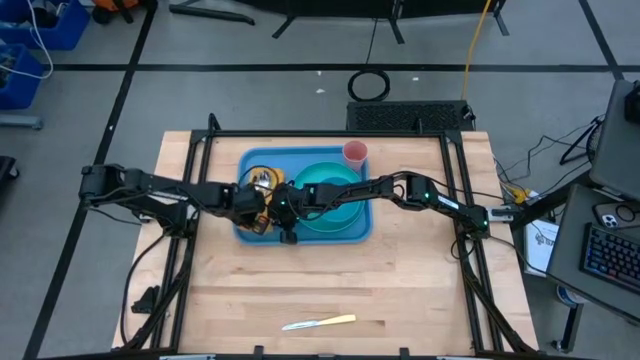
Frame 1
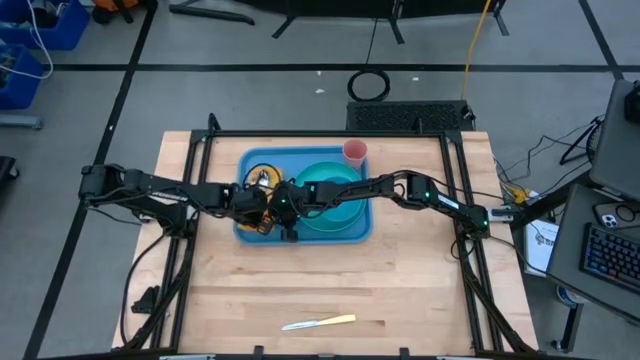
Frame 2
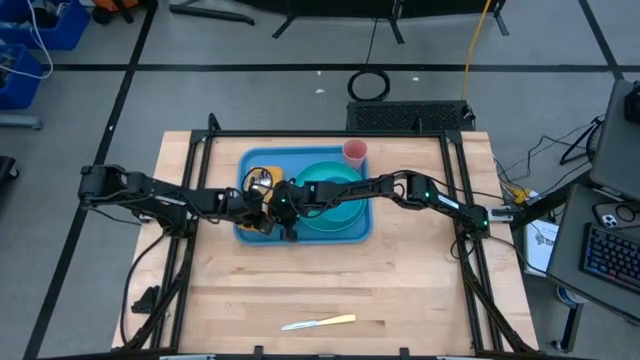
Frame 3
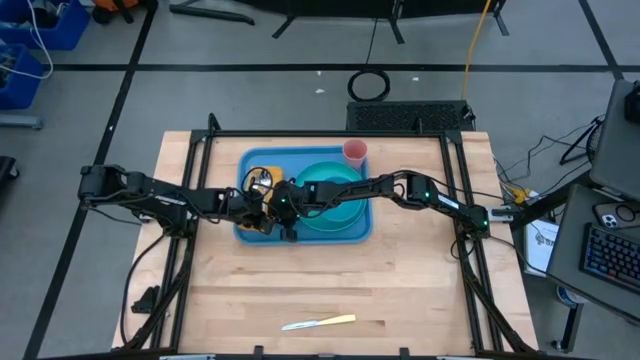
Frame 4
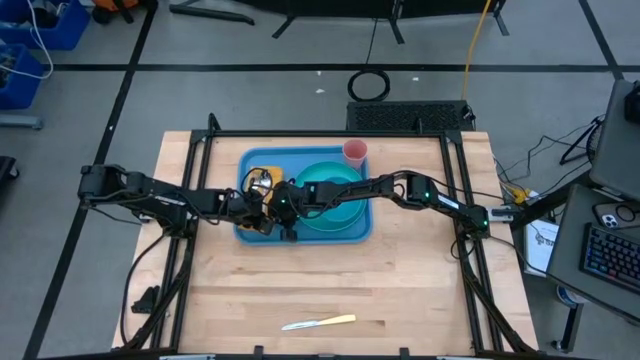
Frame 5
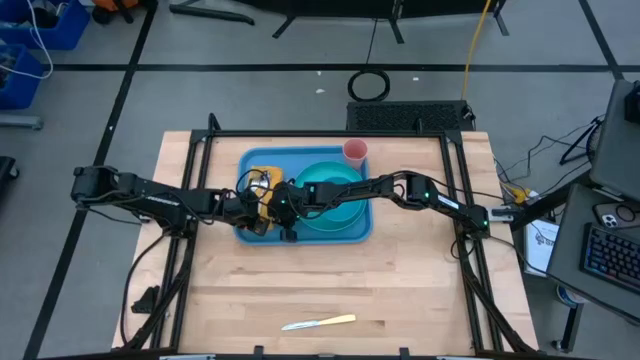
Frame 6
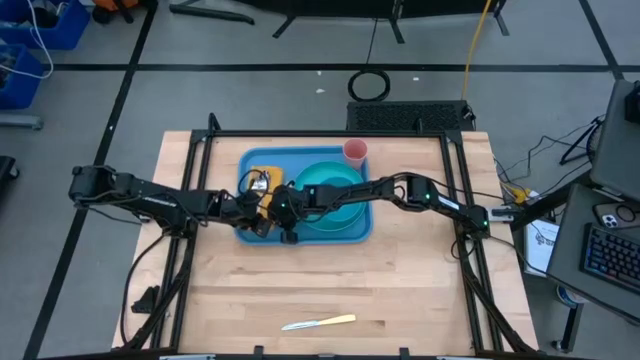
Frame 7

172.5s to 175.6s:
Task: Set up tray
Adjust the orange spoon on the orange napkin on the blue serving tray

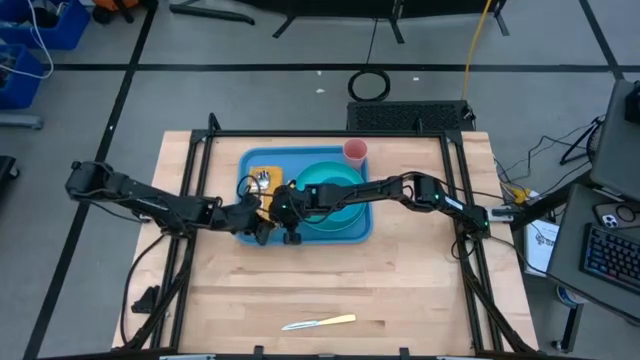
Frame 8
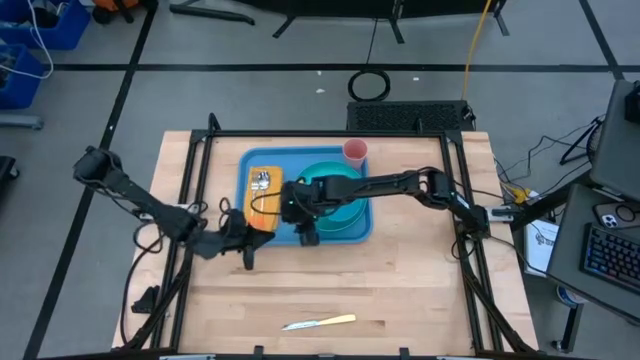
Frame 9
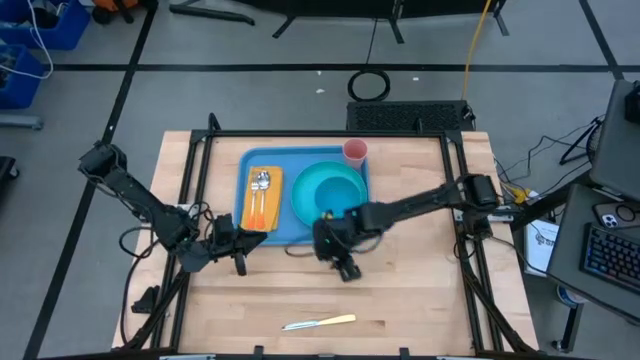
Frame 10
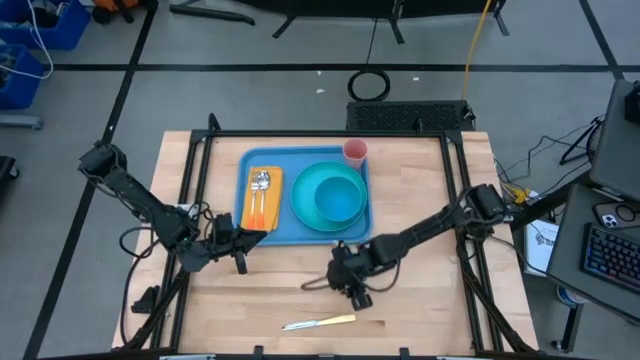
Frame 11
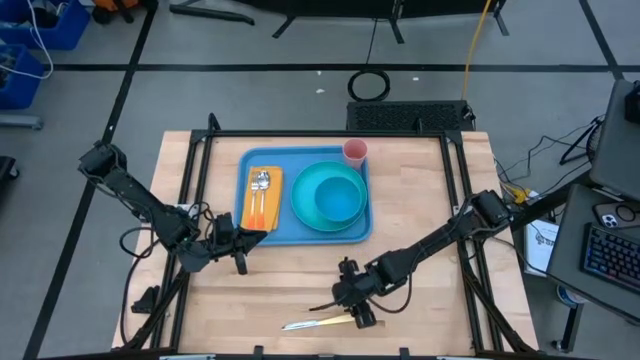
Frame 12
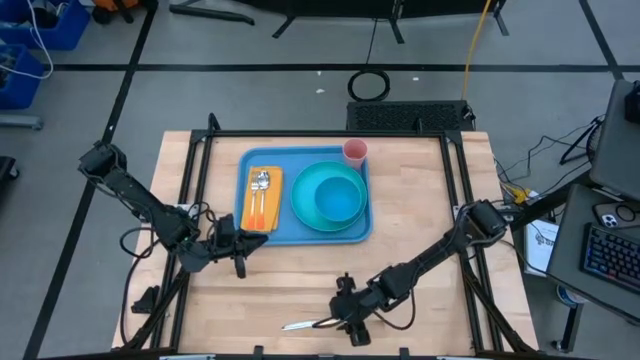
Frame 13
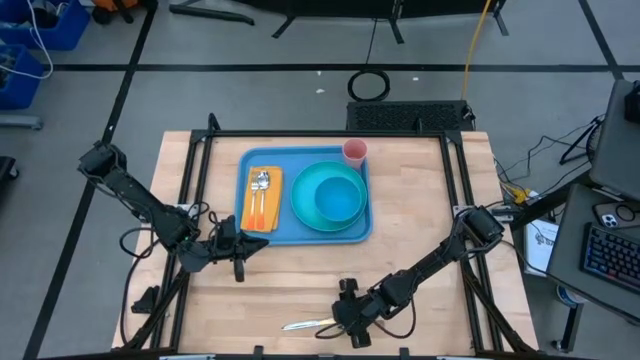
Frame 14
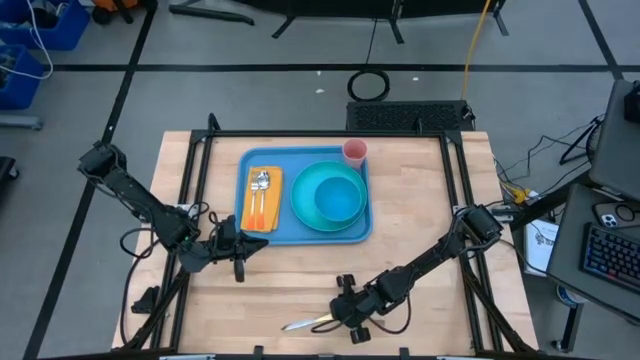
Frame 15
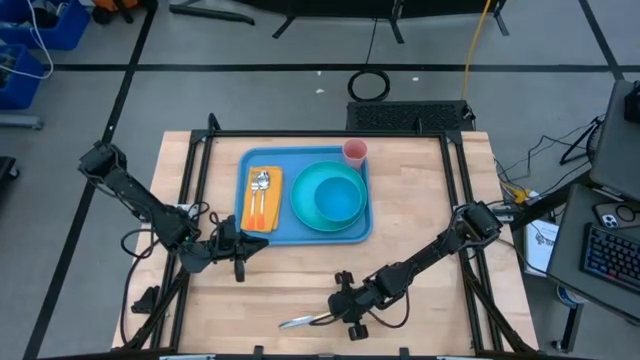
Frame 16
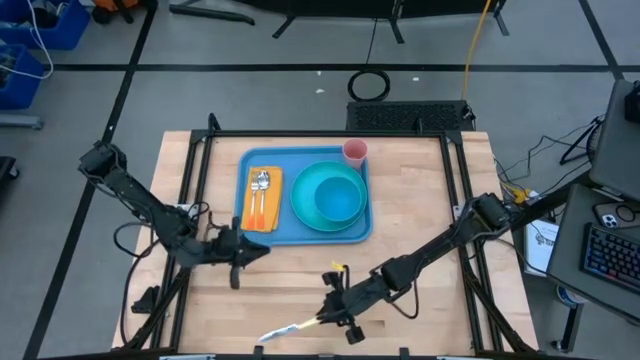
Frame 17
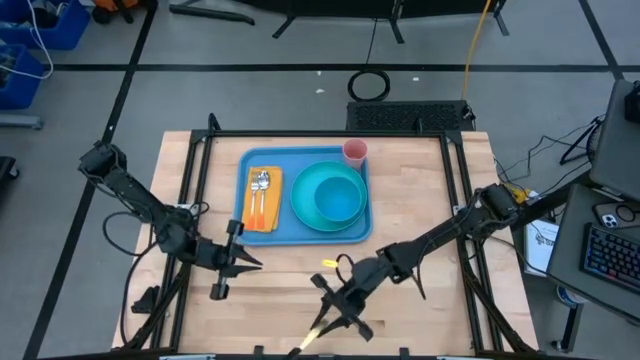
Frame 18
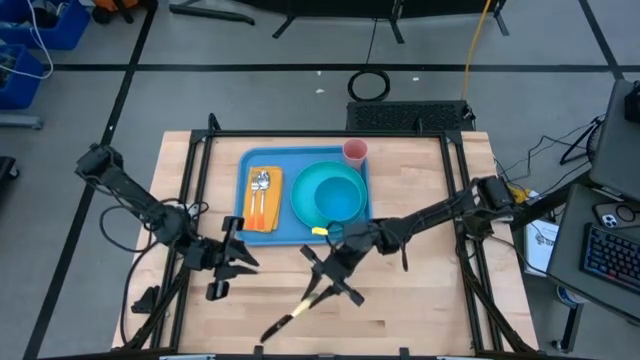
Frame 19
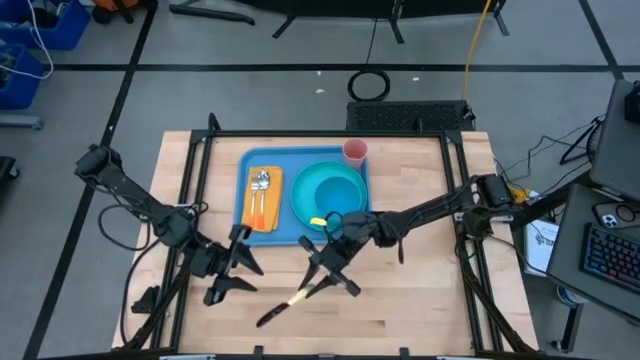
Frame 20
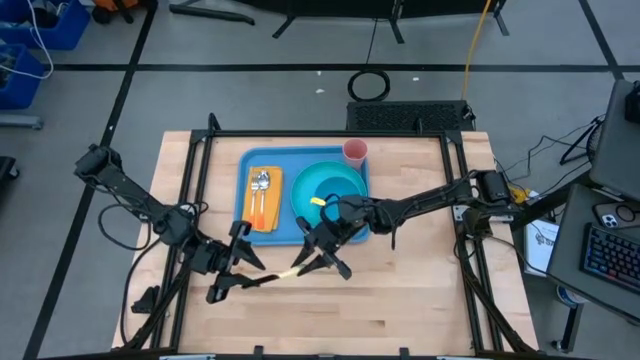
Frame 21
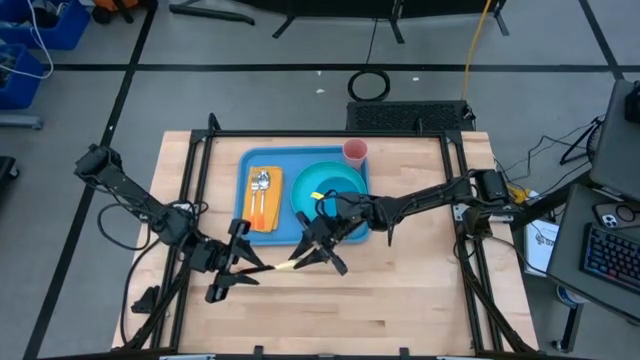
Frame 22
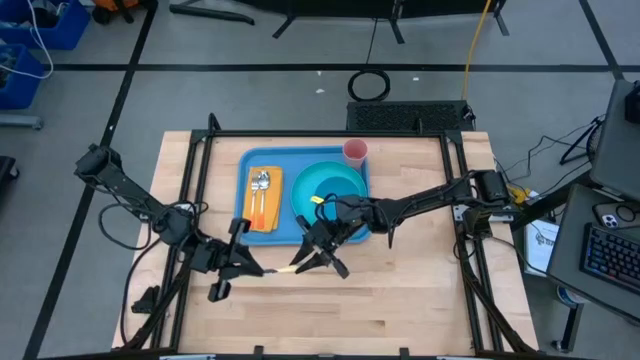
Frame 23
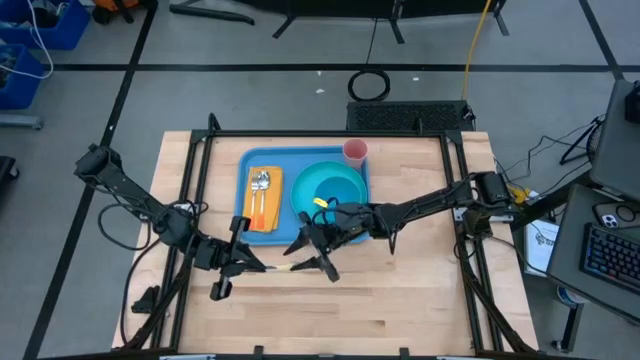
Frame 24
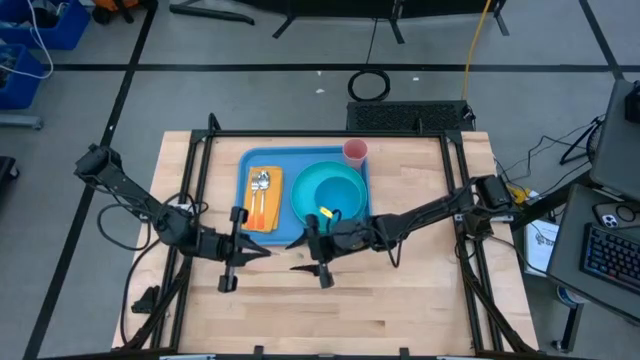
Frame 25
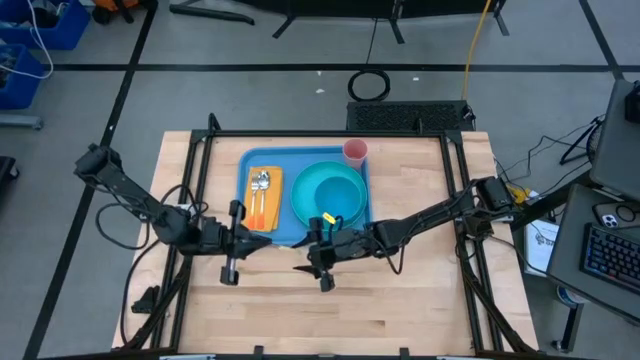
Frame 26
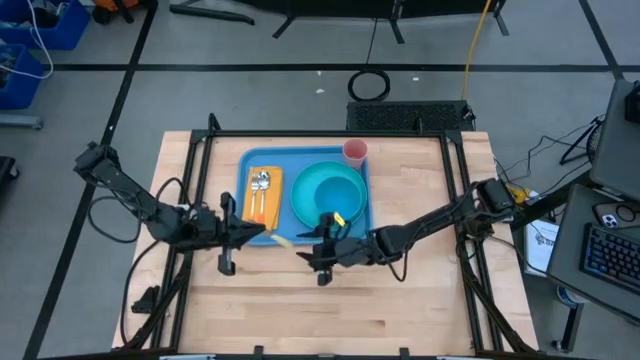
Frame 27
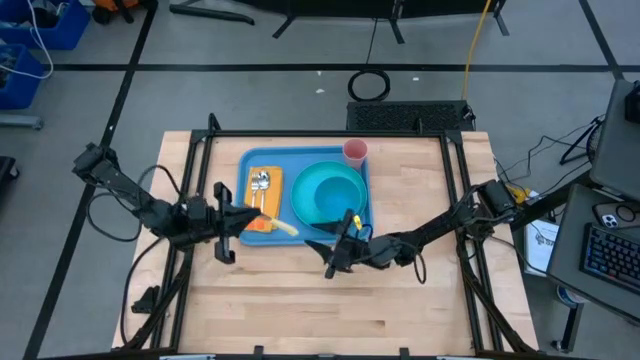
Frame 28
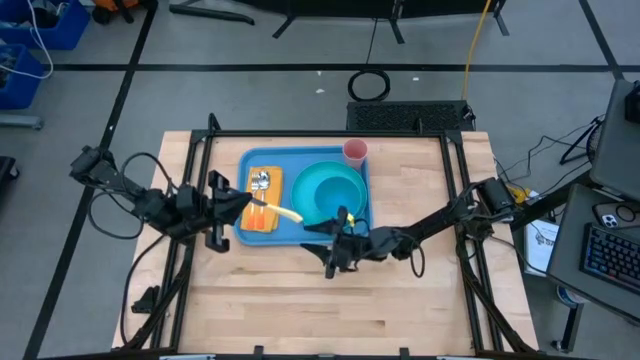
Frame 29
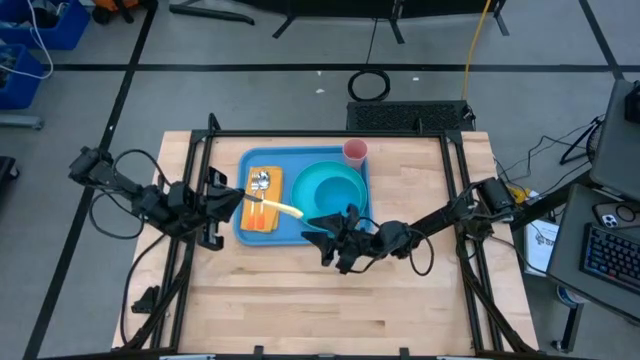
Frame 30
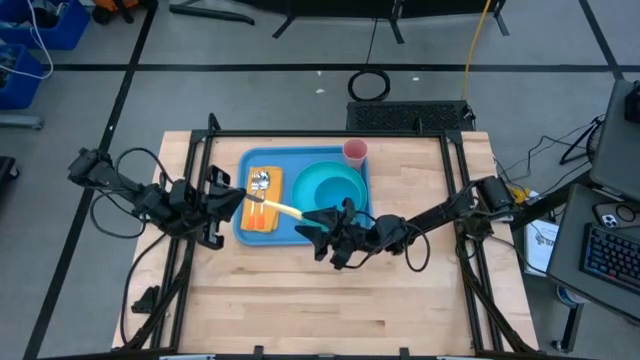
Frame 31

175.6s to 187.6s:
Put the yellow knife on the yellow napkin to the right of the orange spoon on the blue serving tray

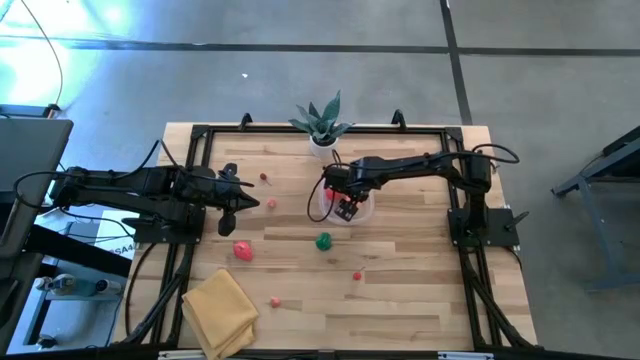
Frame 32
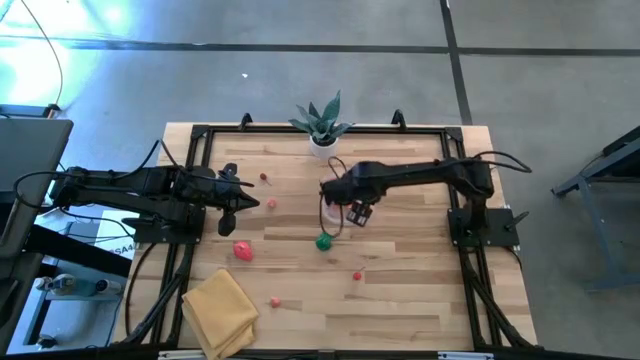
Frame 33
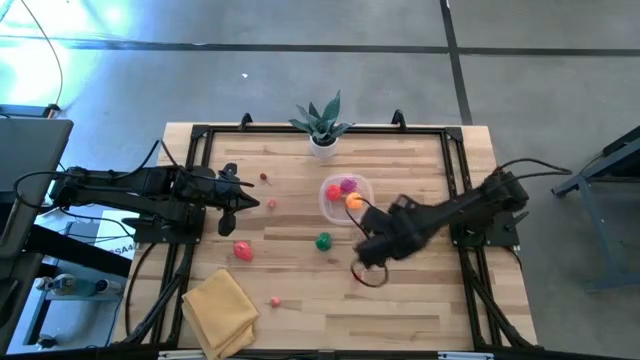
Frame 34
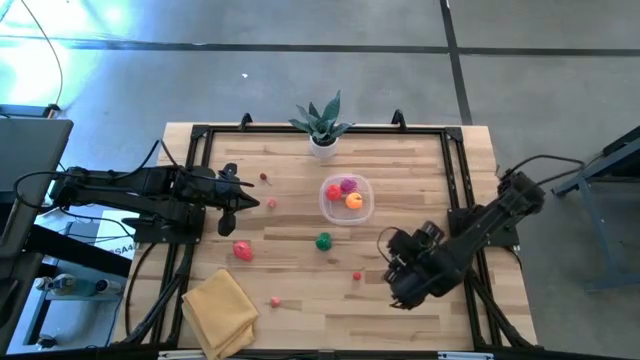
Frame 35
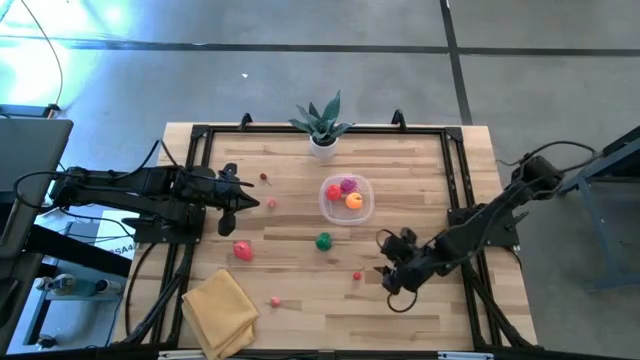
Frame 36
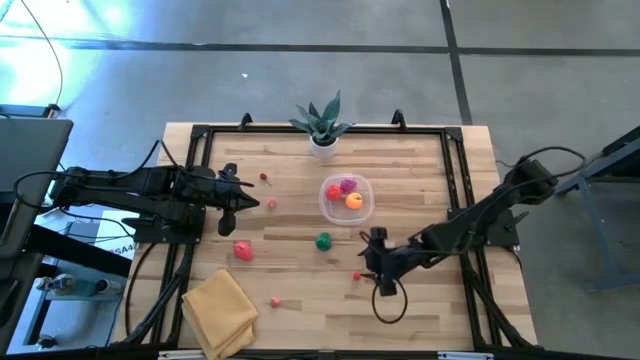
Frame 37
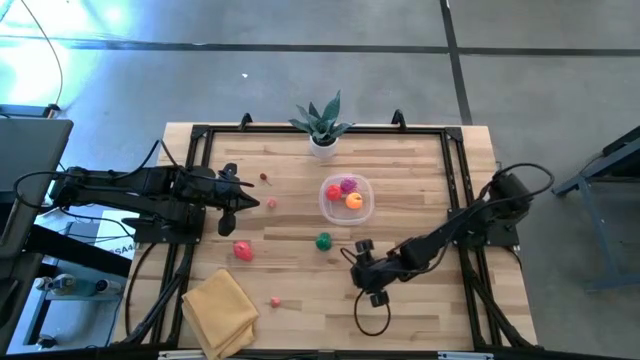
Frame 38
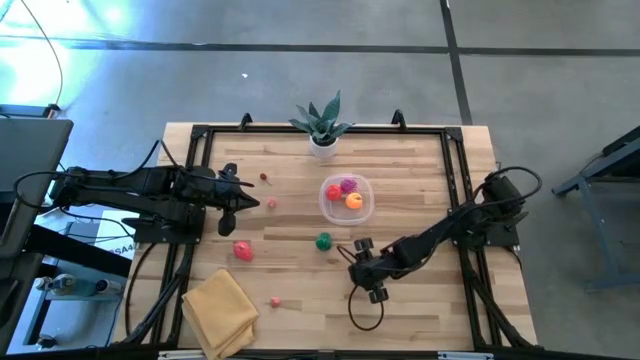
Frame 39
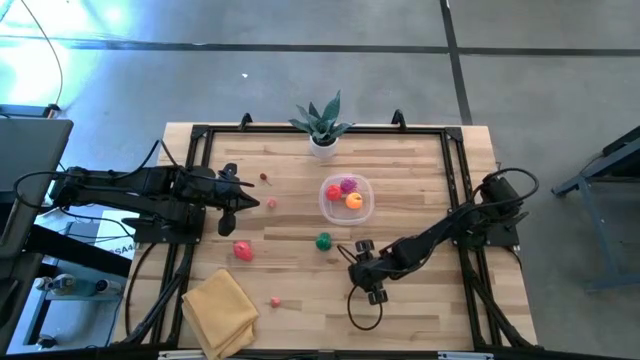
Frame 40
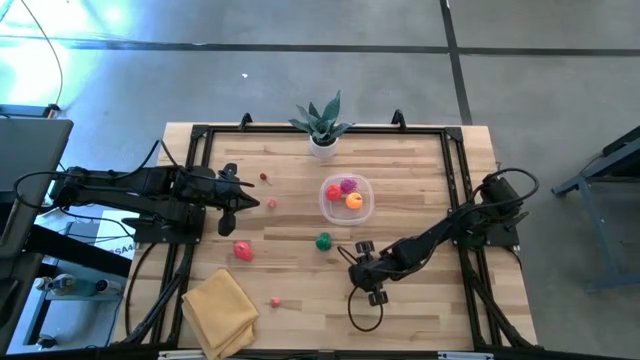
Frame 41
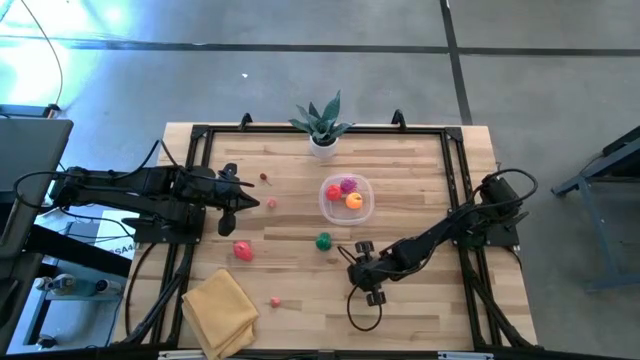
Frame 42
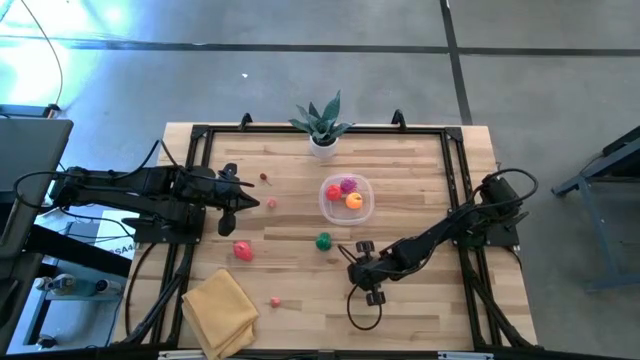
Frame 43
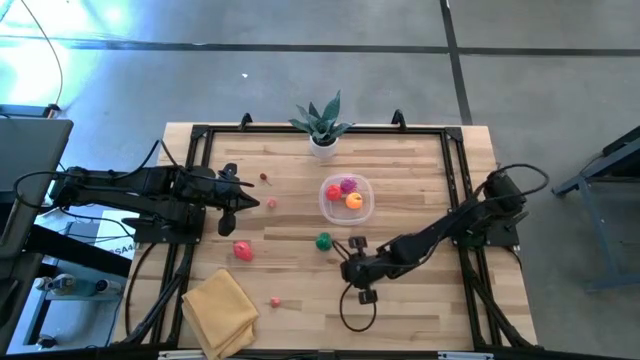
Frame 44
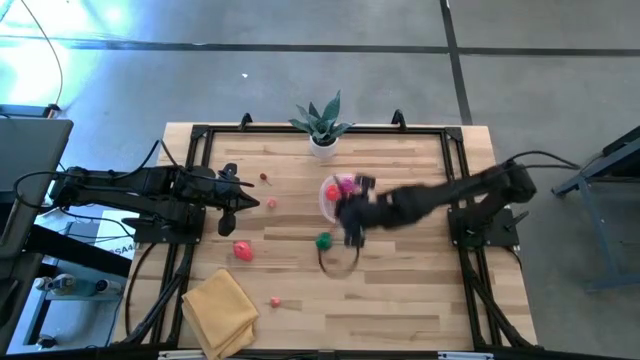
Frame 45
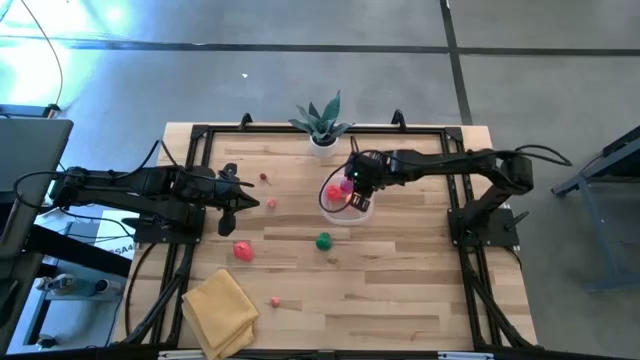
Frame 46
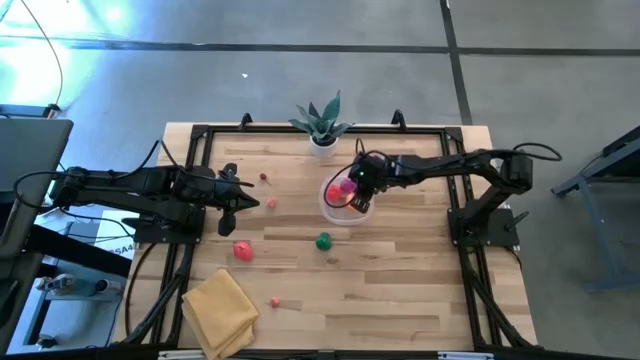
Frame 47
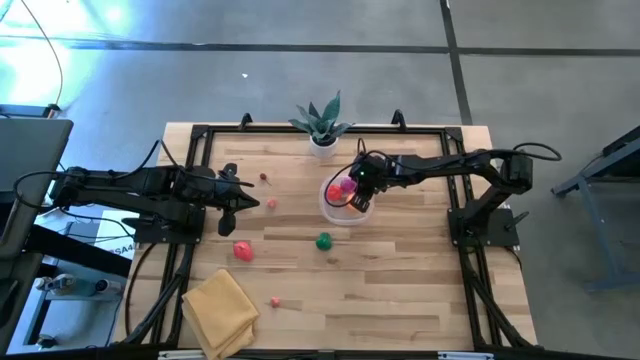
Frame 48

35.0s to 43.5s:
Task: Pick and placing Produce into tupperware
Put the bottom red cherry into the transparent container
